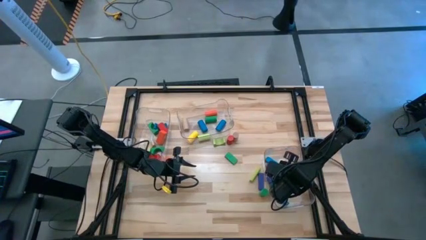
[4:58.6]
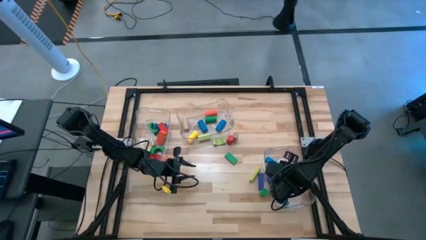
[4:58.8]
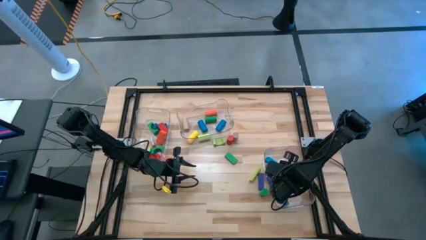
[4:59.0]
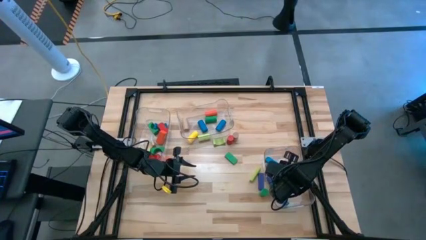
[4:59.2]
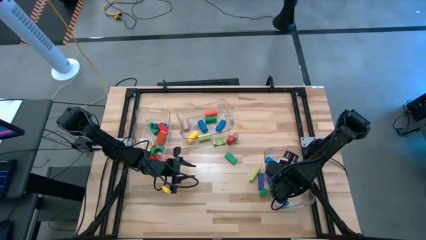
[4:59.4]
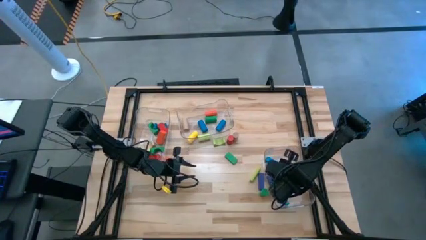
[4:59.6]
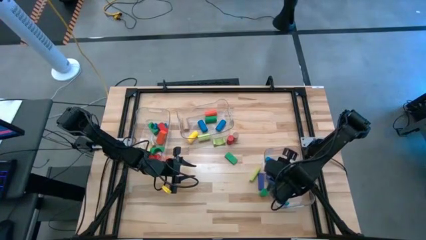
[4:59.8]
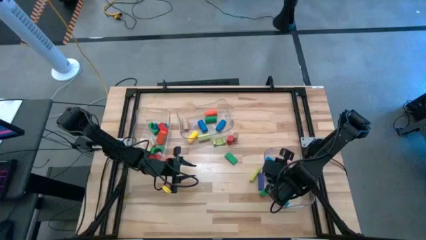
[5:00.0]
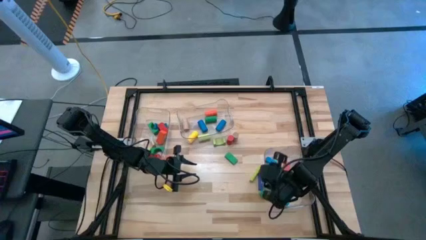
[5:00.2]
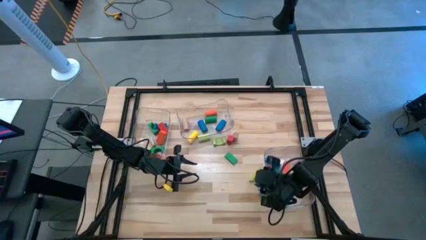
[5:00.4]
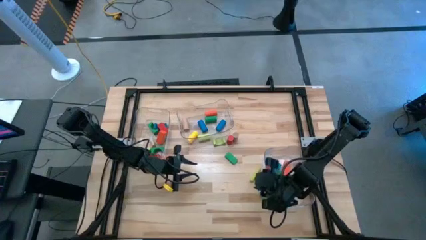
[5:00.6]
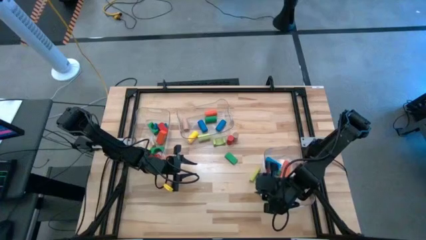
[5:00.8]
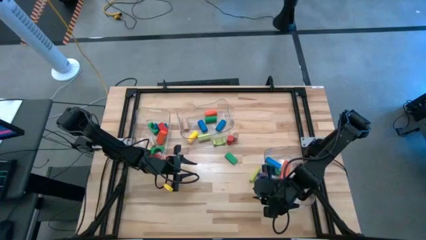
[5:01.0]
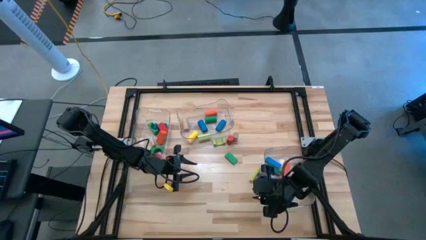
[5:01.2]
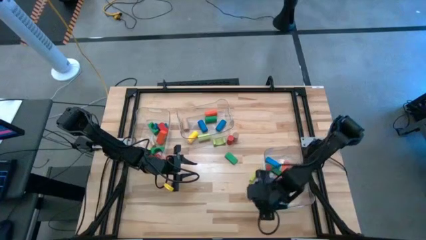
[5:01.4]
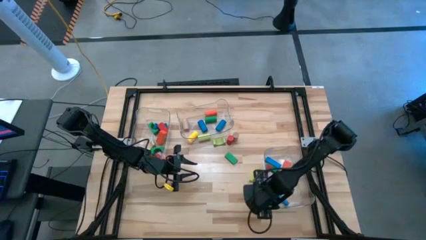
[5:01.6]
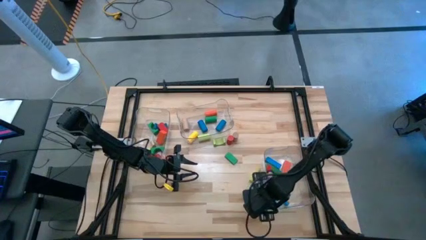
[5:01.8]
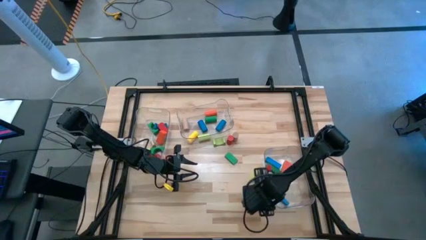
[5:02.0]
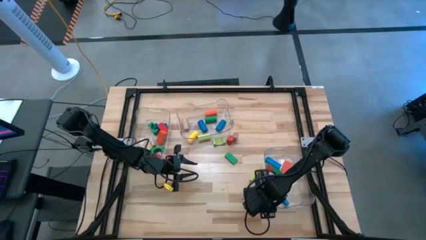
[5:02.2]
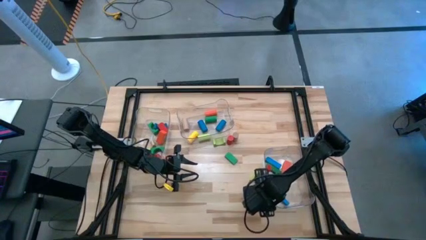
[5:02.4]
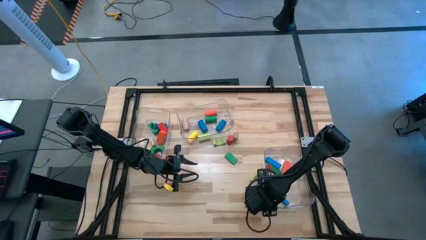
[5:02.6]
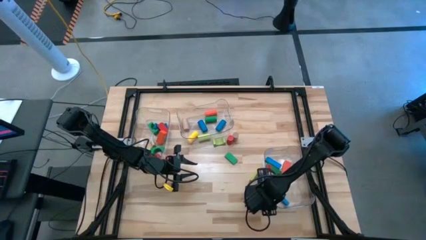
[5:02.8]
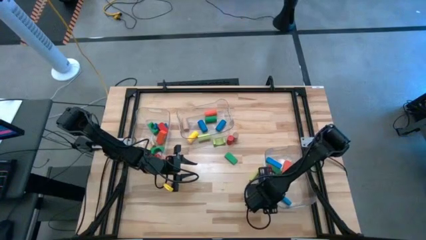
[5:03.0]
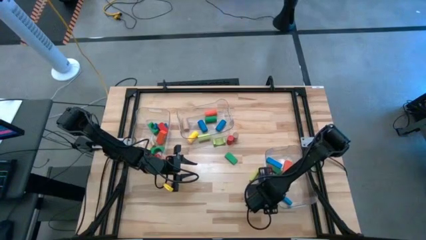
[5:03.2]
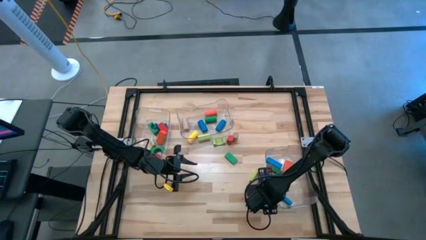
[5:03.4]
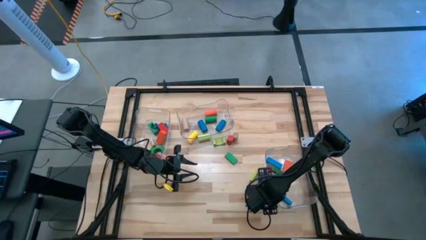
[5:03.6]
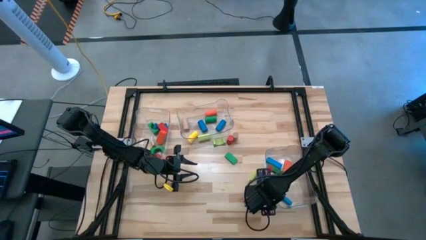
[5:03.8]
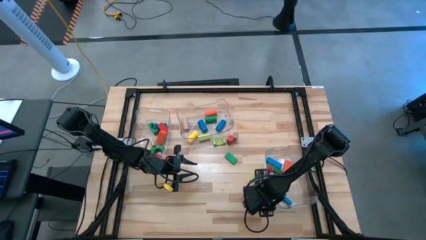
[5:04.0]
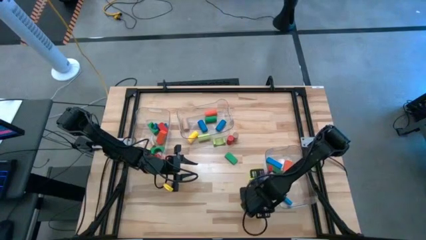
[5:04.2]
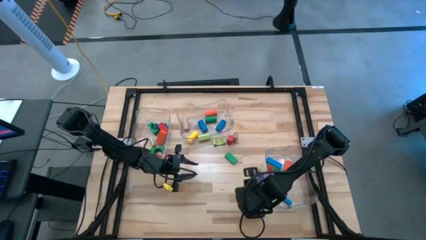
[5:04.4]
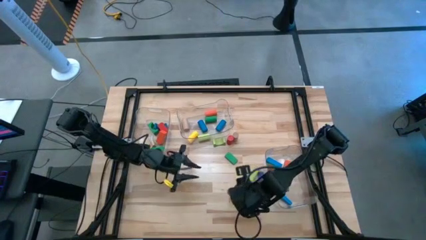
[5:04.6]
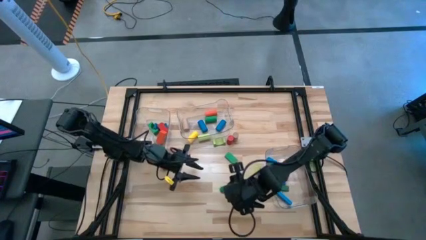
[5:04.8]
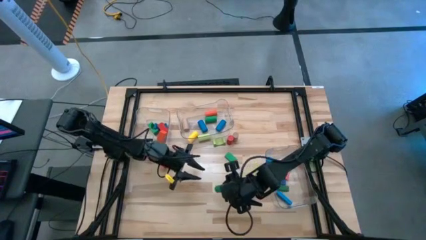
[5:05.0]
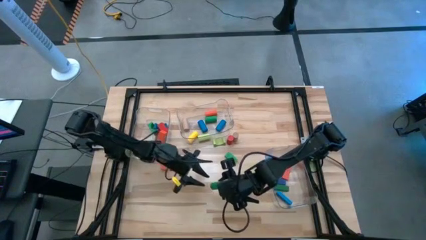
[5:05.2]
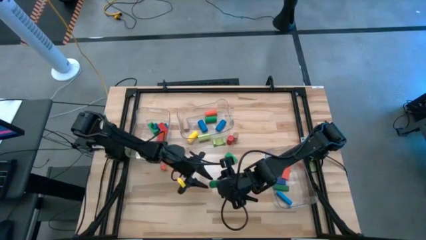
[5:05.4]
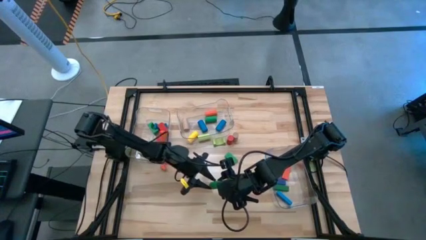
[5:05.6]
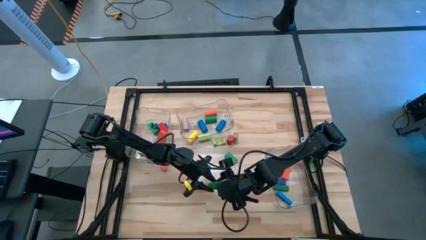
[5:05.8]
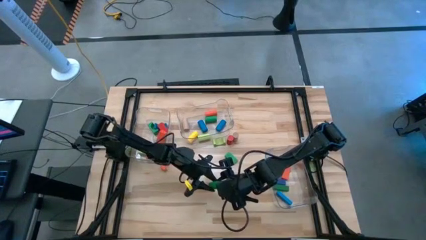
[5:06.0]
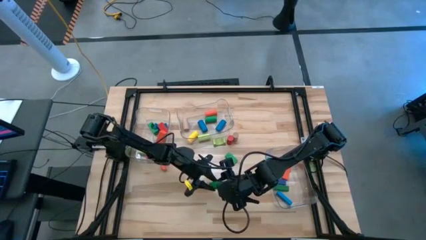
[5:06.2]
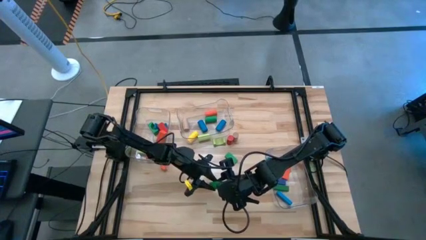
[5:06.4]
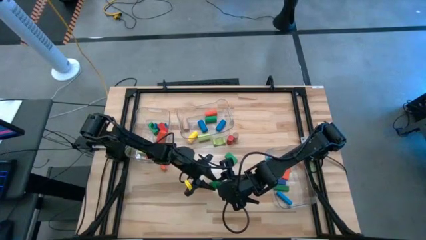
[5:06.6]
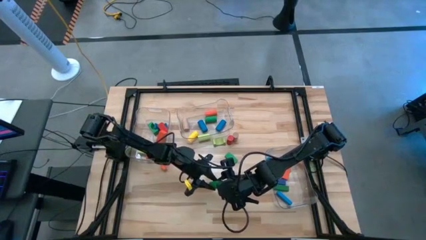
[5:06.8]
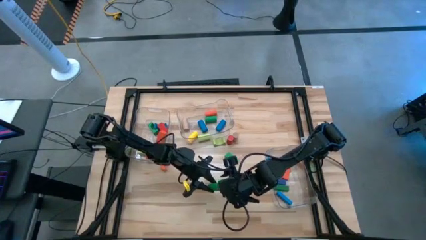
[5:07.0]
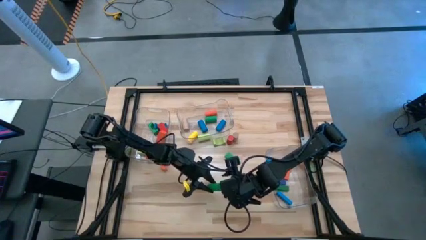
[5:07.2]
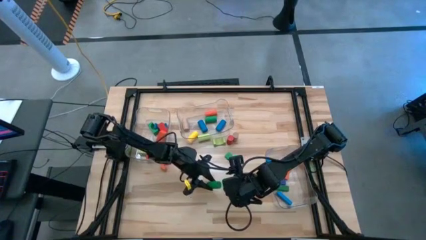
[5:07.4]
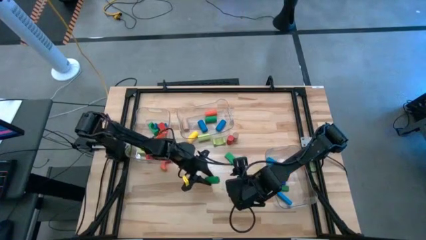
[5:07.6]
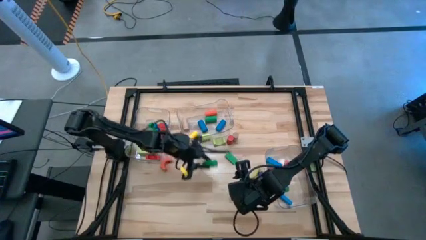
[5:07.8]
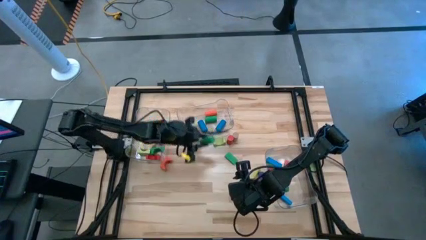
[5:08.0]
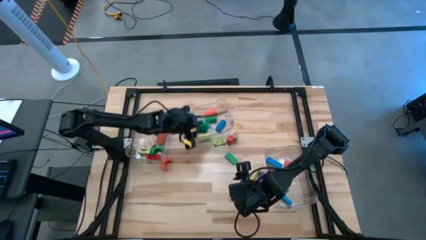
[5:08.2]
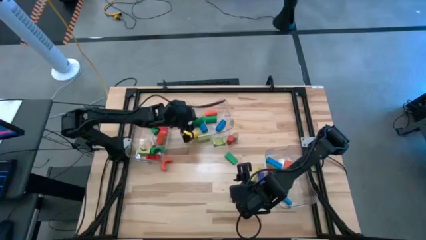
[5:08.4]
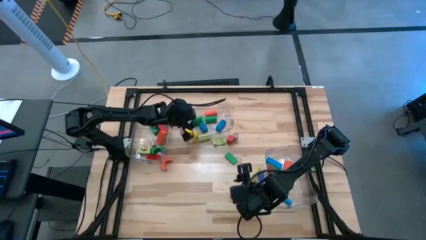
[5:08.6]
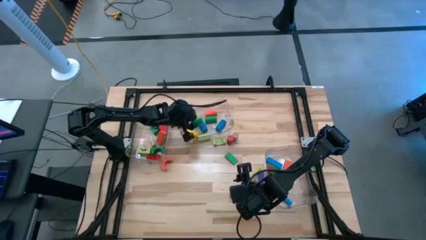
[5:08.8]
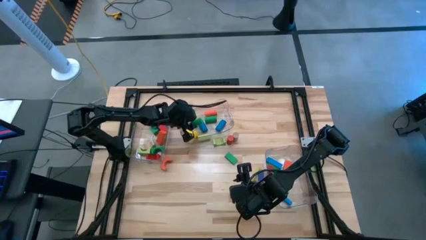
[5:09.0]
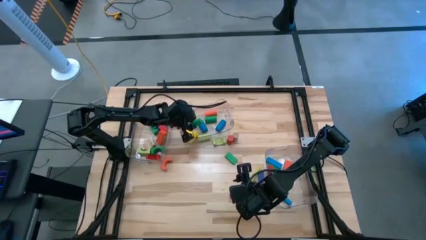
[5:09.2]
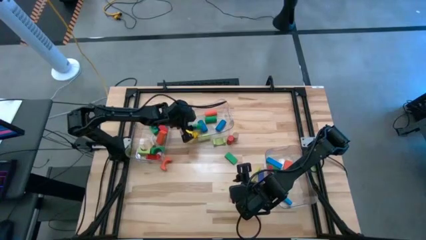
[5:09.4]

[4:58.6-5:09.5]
Task: Sort blocks by size
Put the green cylindrical block into the top transparent bin

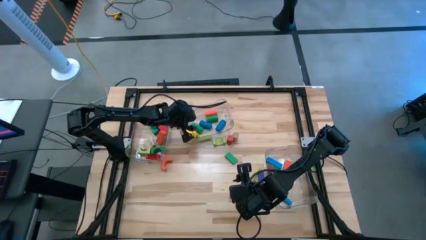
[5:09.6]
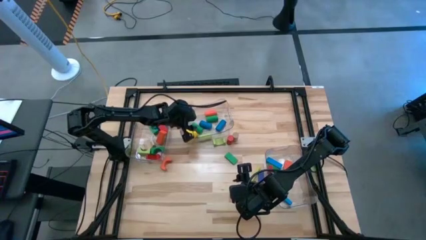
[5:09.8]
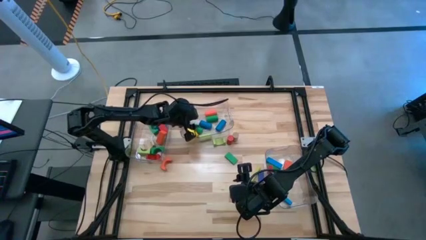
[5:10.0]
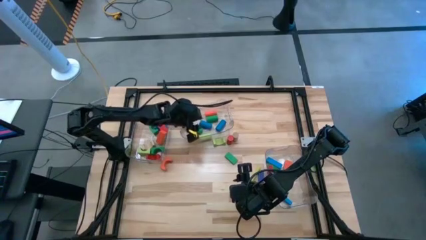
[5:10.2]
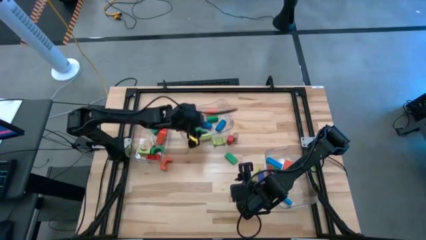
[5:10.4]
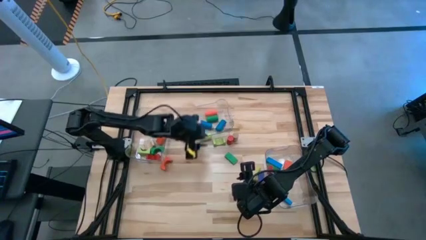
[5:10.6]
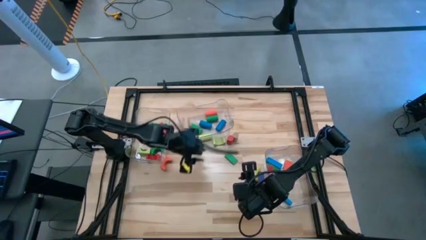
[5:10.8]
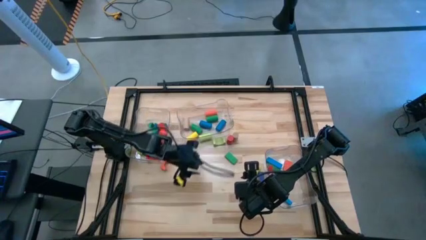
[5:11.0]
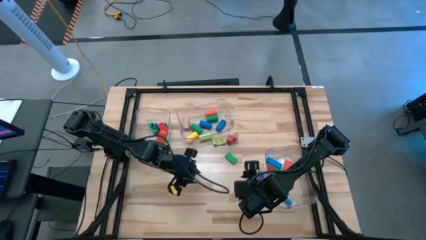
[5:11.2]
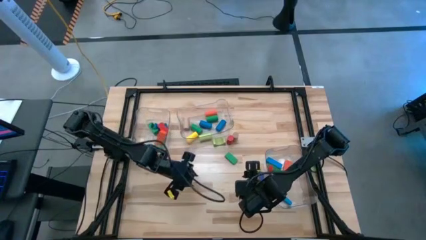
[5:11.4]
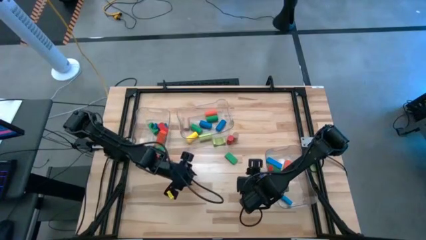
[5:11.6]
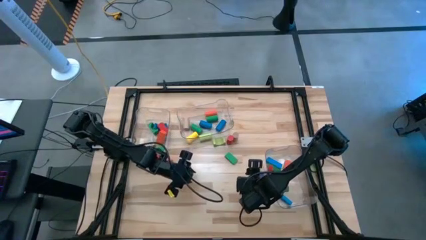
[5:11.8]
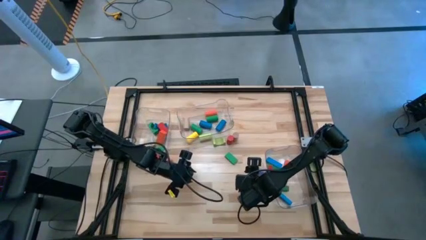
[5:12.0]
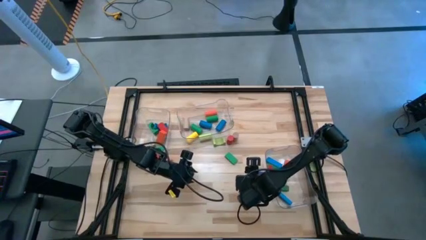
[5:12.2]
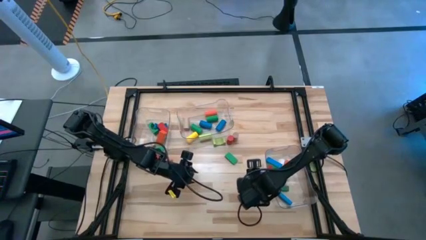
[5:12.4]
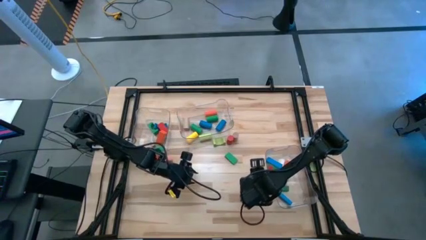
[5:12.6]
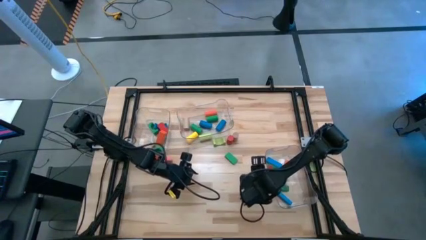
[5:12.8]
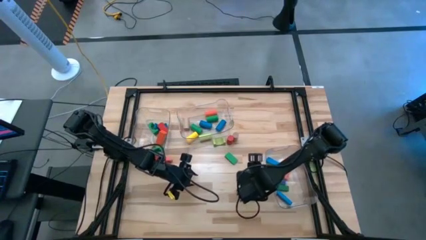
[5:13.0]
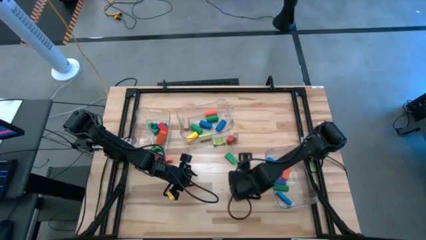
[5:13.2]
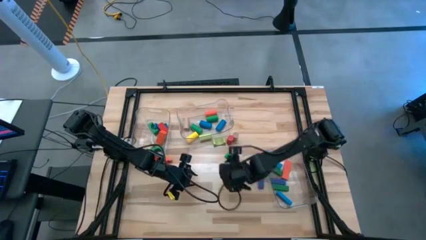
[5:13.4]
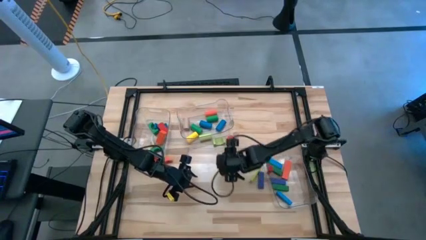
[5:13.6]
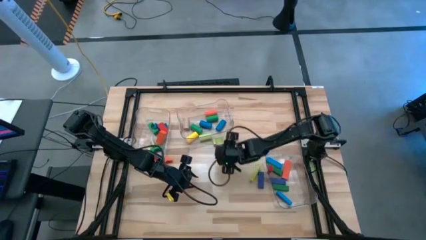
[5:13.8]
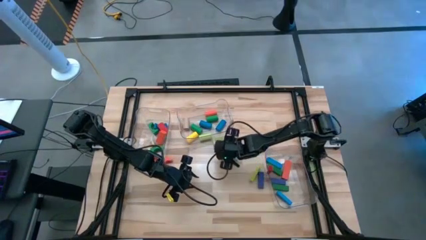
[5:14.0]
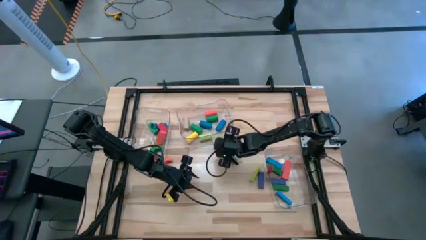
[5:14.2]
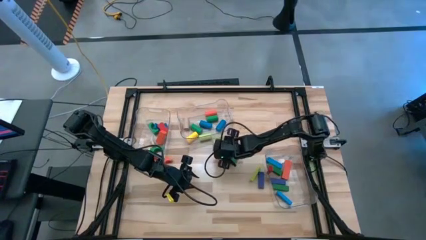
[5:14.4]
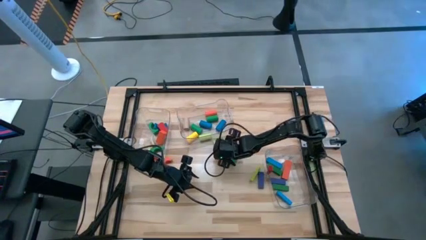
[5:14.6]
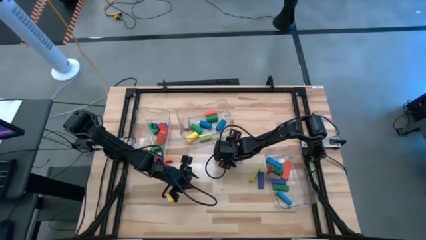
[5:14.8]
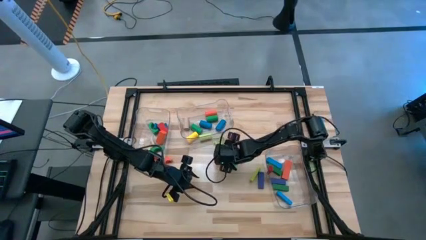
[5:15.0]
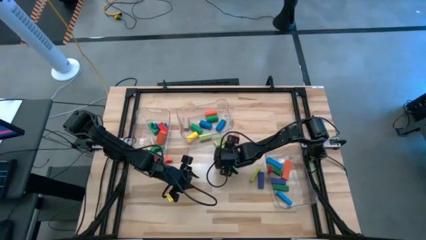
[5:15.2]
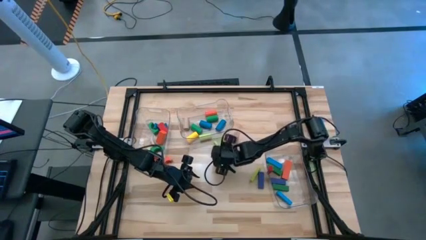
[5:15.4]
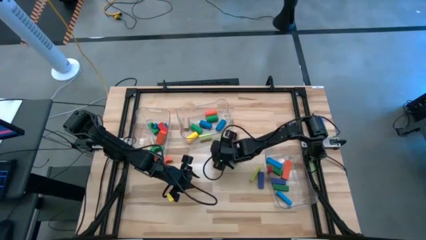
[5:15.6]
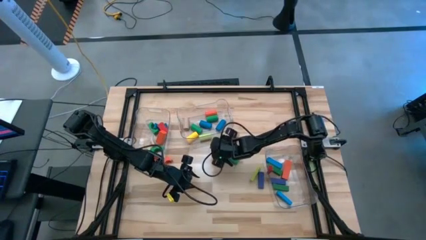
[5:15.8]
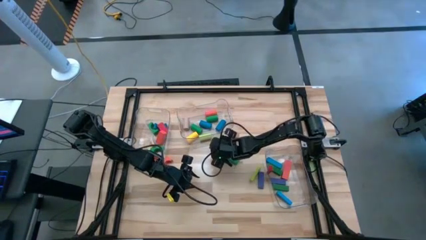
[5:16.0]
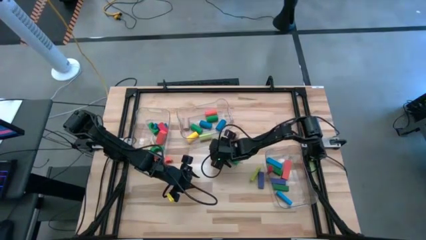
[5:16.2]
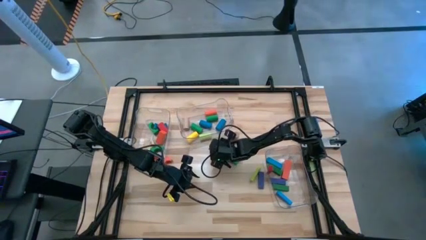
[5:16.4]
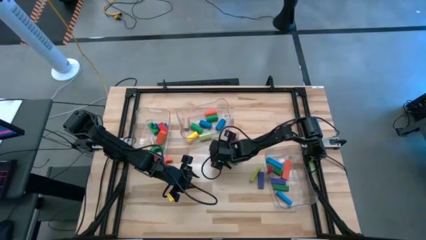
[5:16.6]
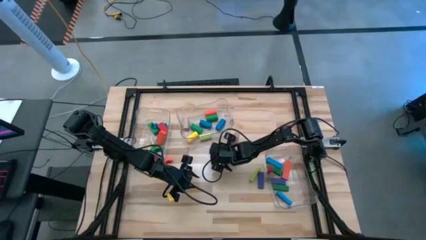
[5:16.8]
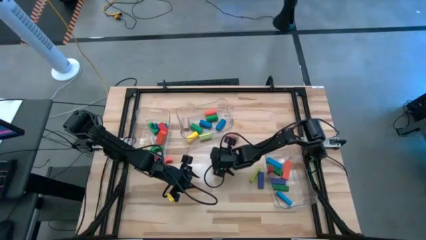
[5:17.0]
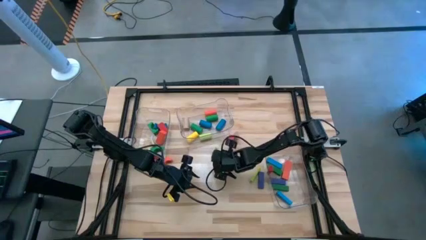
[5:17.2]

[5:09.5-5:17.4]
Put the light green arch block into the top transparent bin
